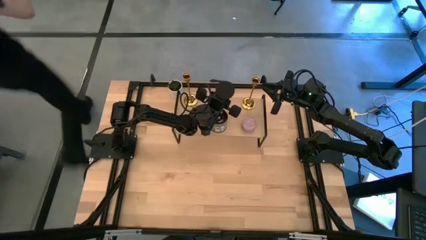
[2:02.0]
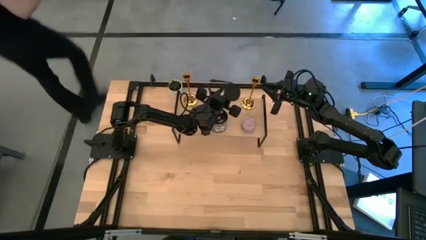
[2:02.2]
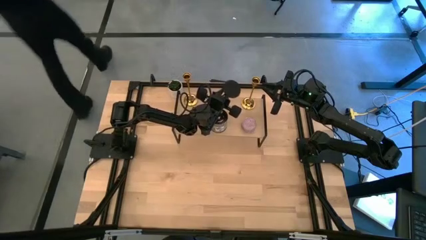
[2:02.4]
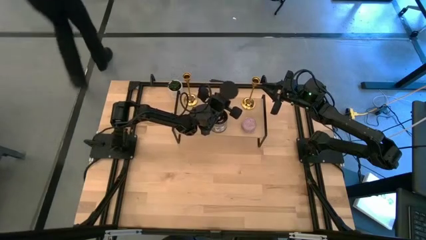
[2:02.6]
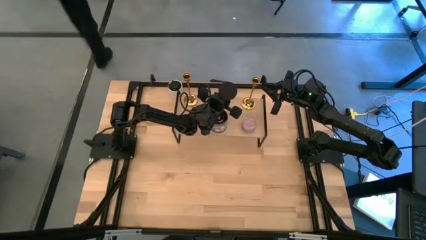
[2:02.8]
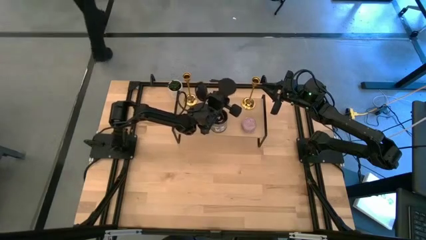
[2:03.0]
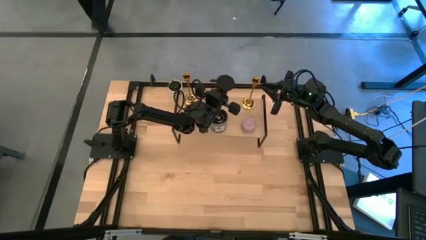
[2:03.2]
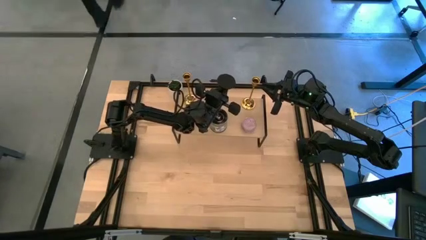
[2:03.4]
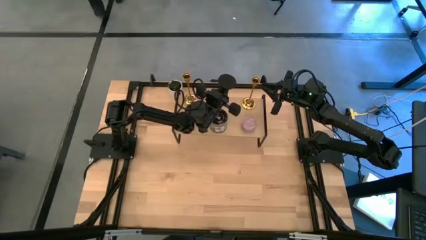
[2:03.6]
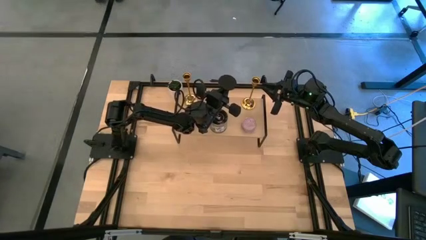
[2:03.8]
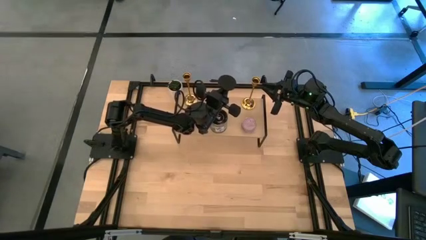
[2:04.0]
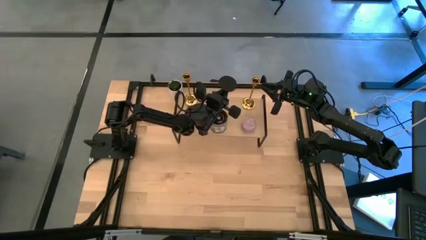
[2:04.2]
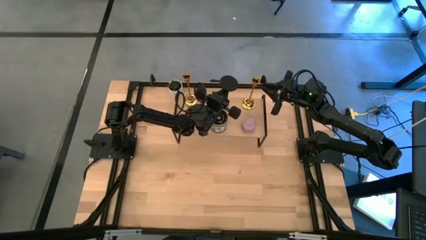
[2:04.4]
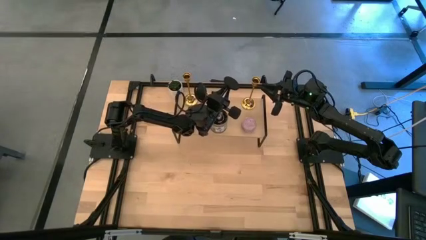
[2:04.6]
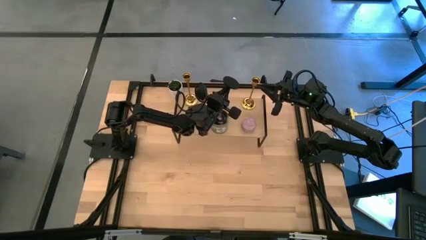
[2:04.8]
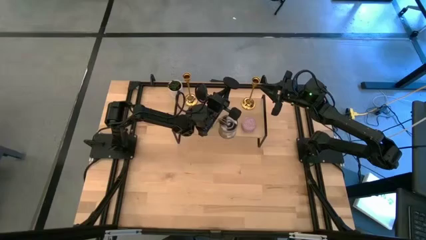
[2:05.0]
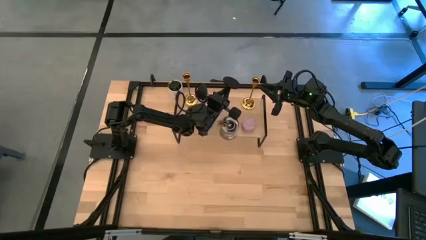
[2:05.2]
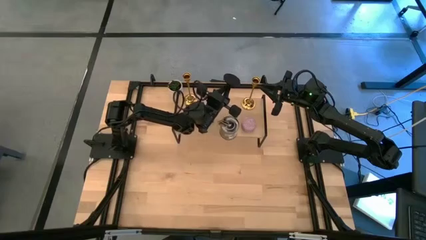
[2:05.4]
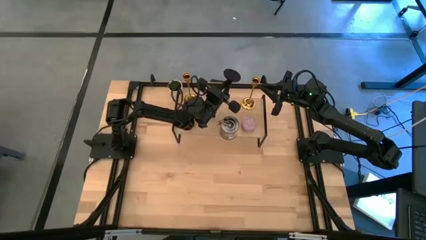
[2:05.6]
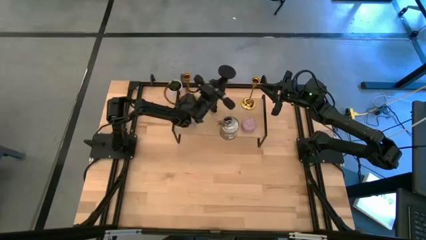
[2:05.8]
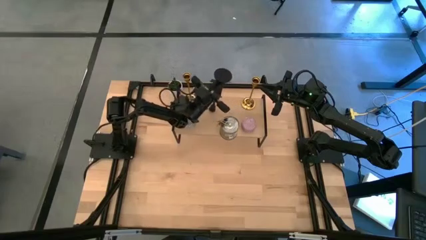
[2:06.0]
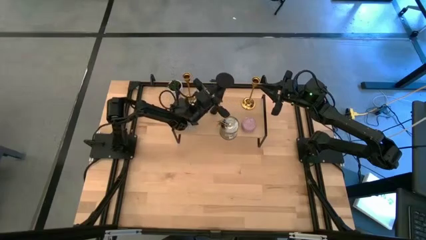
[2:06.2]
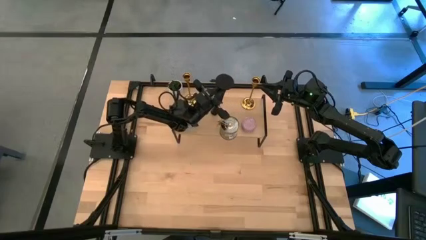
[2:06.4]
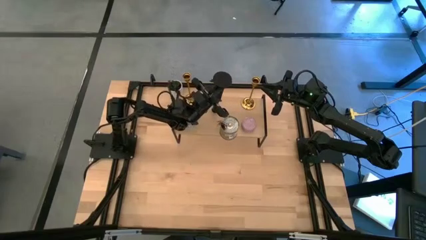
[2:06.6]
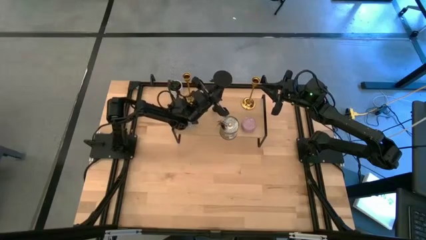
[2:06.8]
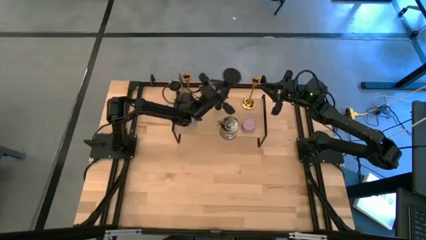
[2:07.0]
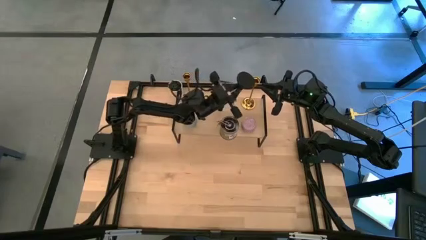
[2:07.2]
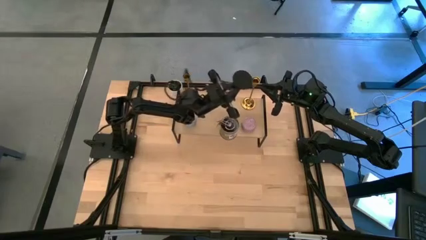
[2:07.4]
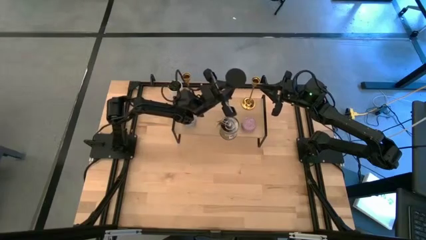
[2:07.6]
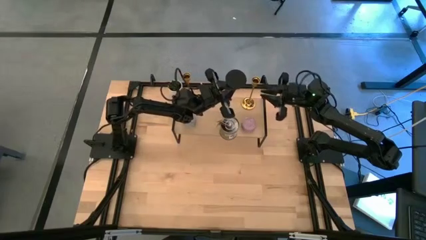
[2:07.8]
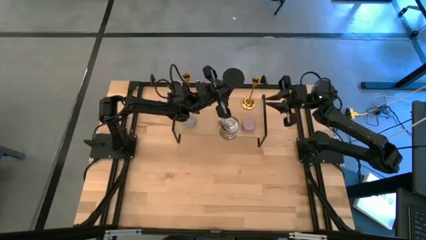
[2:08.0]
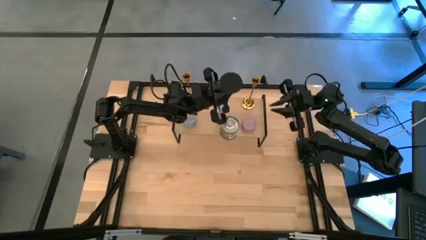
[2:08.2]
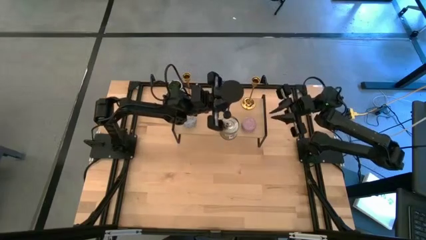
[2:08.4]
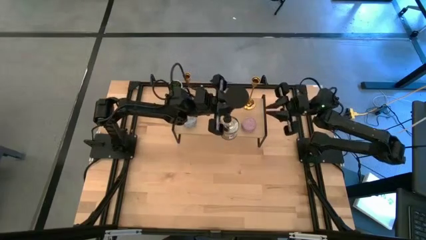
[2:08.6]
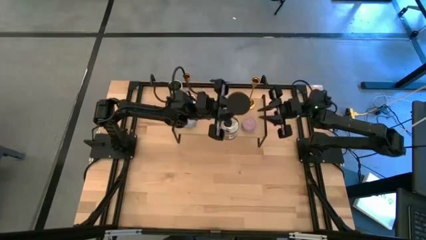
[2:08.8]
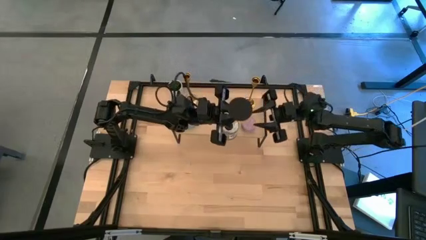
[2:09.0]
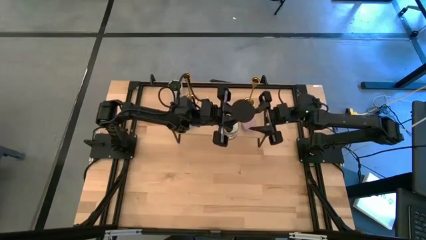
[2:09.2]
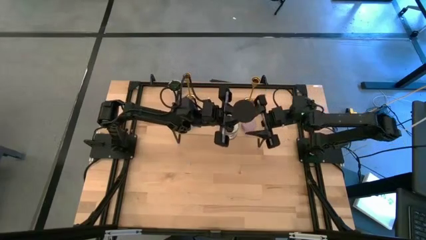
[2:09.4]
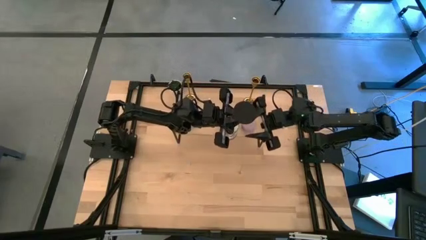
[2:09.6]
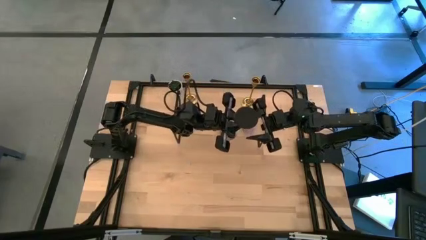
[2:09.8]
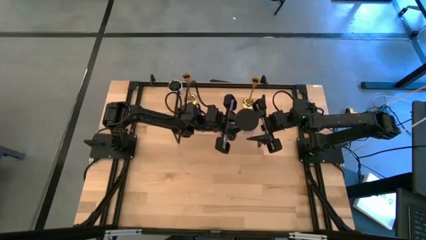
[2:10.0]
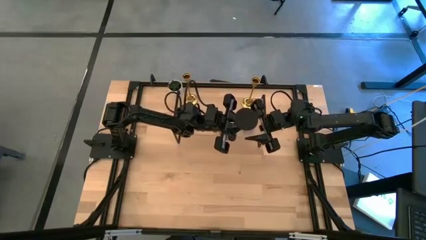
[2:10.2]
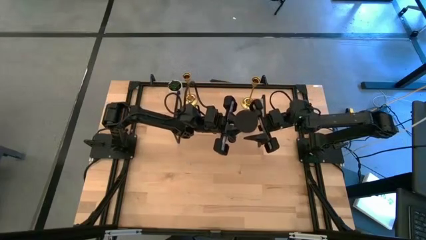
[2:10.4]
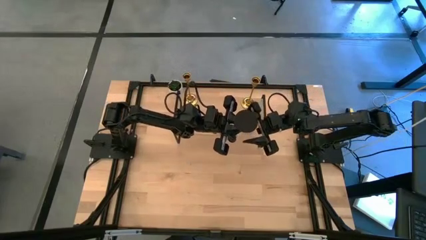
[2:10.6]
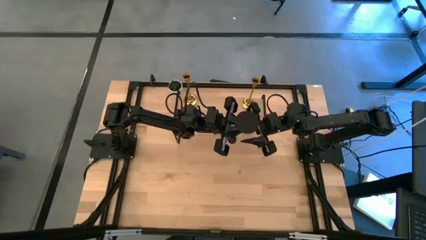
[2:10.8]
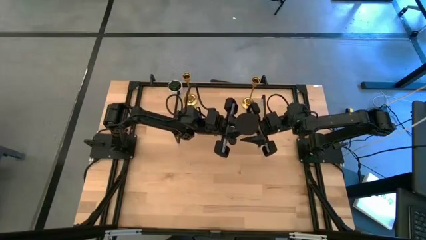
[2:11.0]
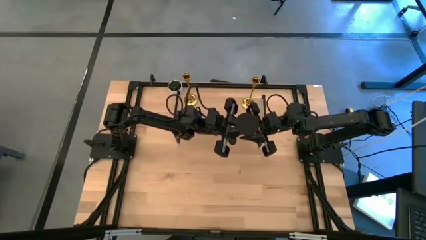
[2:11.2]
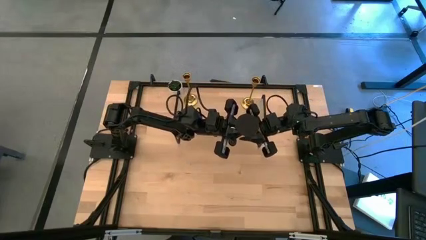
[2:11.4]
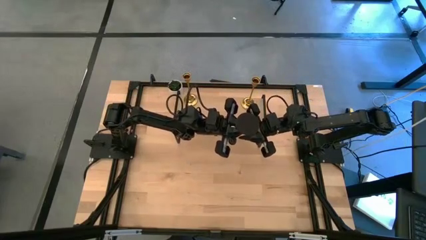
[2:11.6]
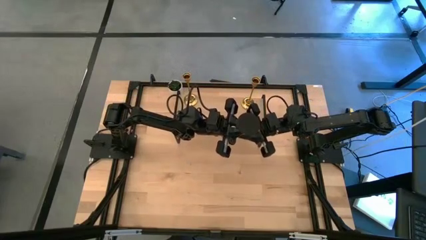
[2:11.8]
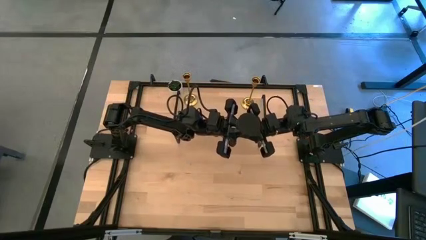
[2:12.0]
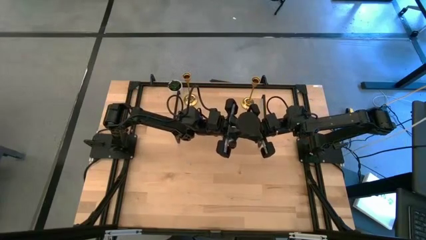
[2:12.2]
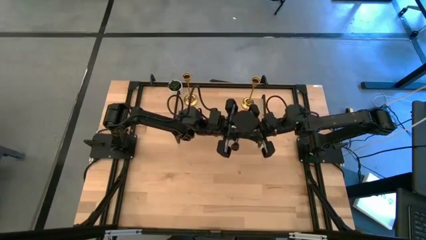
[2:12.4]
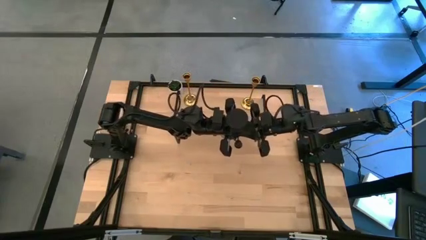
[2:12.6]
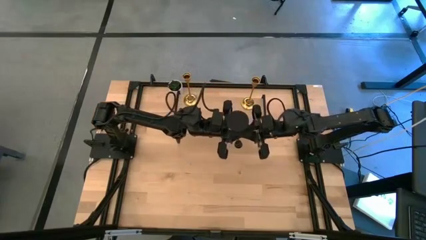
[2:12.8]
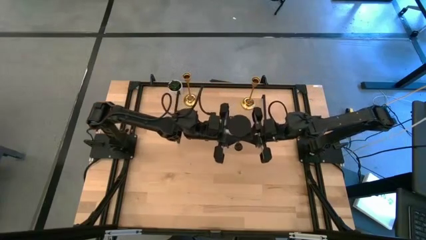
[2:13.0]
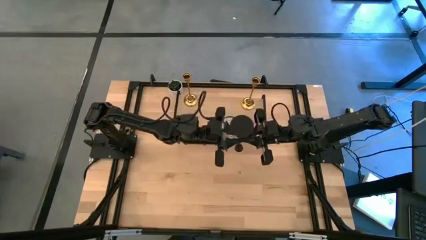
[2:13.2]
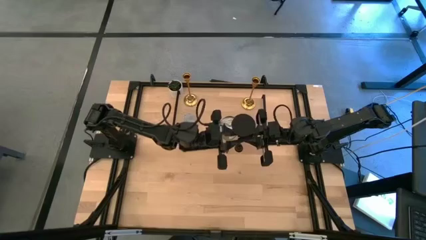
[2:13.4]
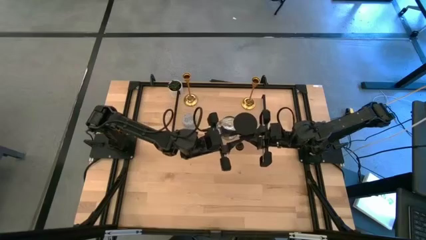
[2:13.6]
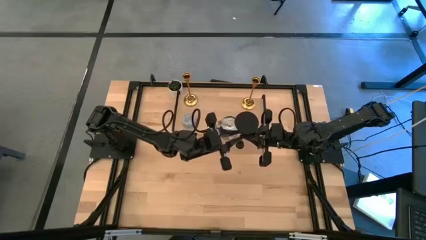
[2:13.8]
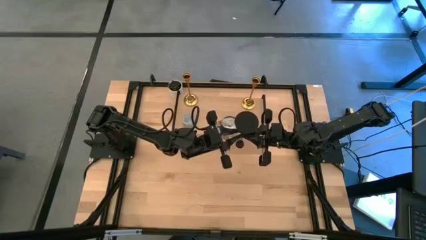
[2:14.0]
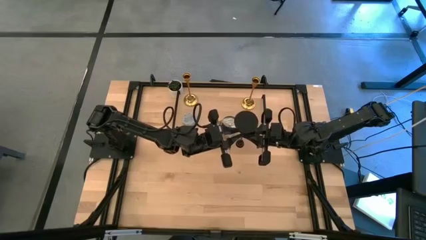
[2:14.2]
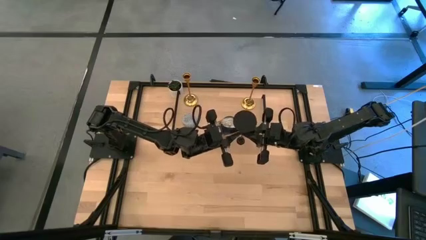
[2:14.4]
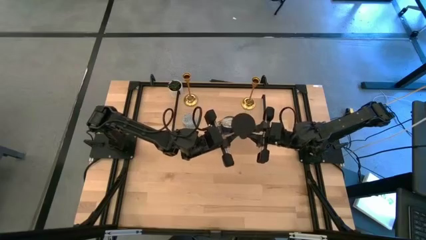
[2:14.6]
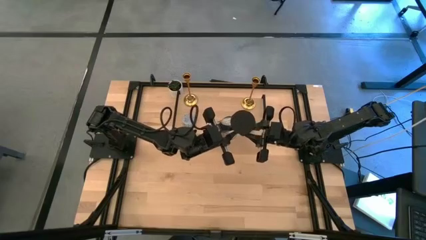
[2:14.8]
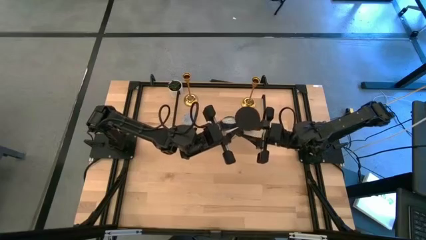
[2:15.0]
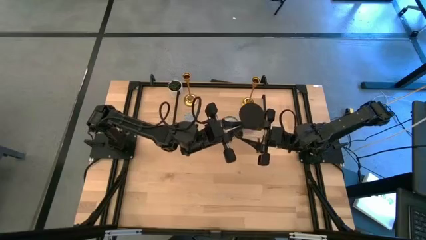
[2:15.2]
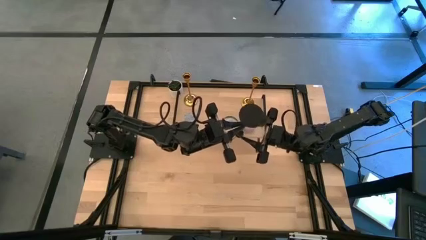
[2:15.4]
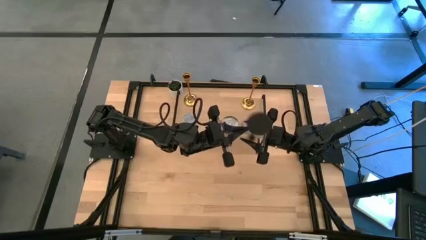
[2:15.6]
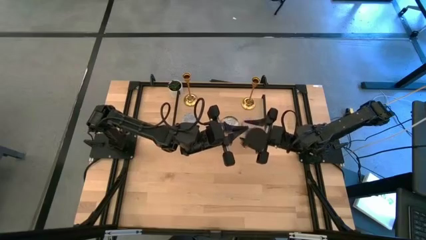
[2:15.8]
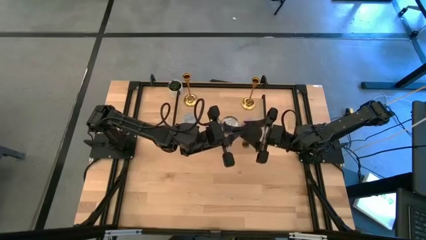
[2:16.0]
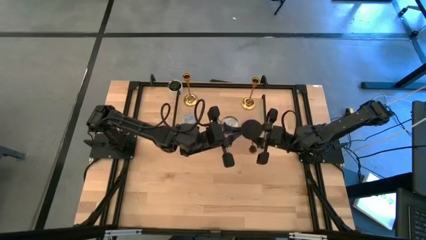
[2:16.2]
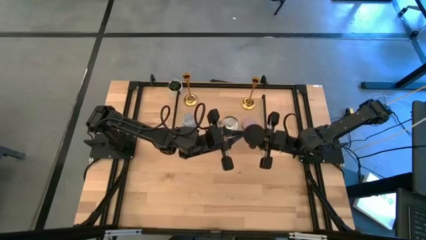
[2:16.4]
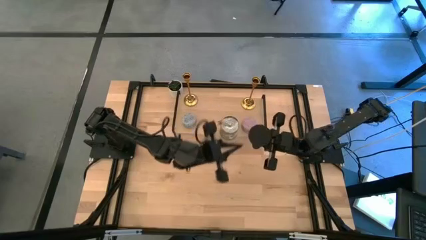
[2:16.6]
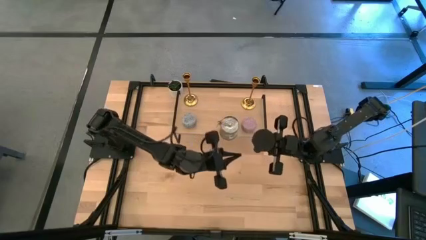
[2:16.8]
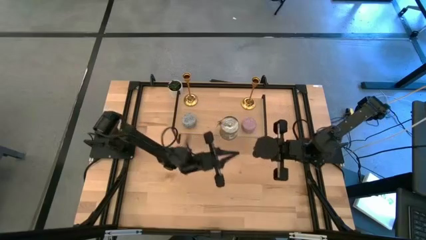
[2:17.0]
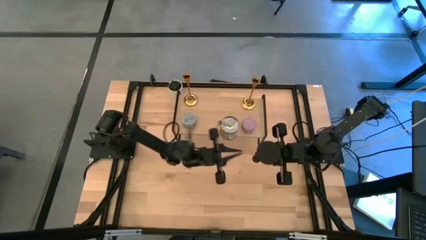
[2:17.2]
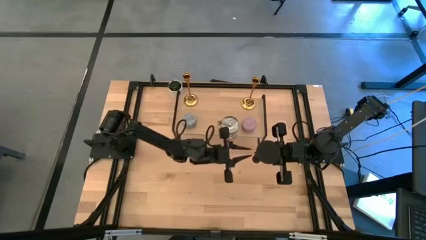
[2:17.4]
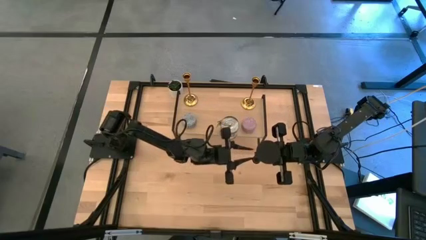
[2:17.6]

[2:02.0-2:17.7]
Task: Pick & Place candle stick holders
Put the black candle holder on the shelf
